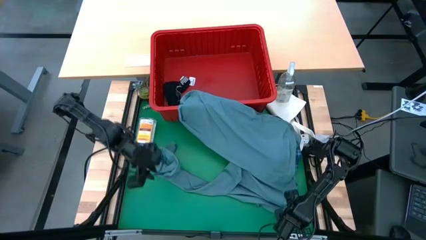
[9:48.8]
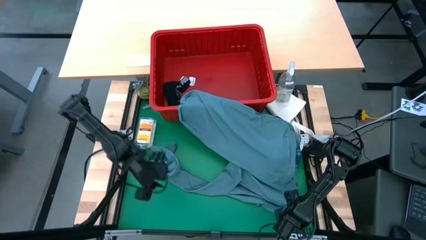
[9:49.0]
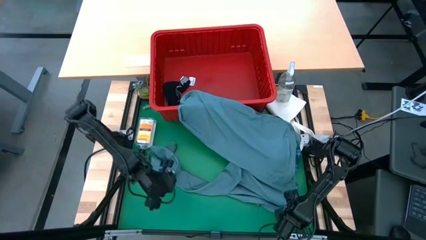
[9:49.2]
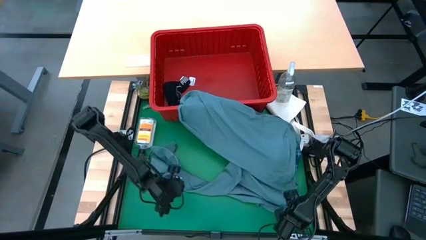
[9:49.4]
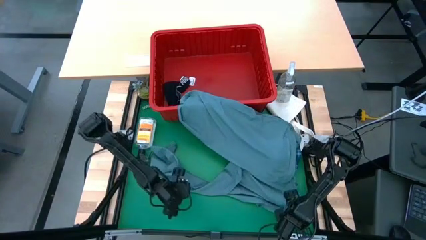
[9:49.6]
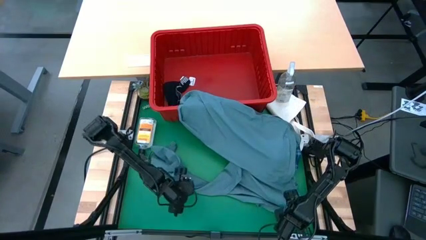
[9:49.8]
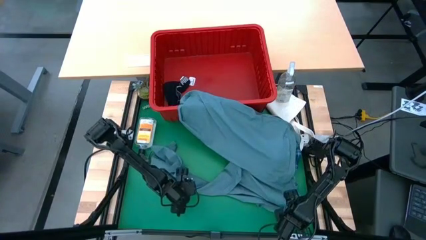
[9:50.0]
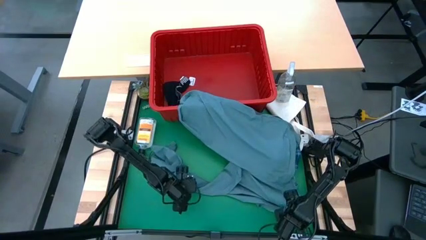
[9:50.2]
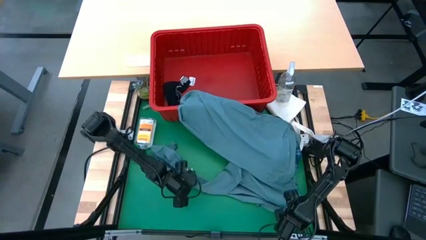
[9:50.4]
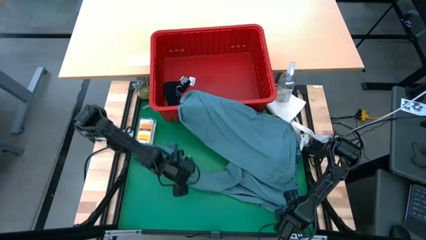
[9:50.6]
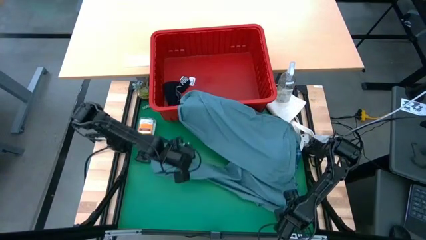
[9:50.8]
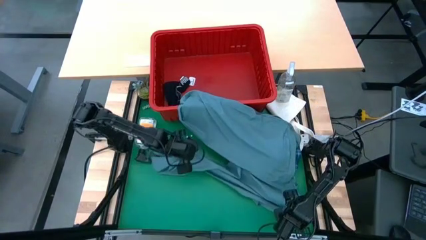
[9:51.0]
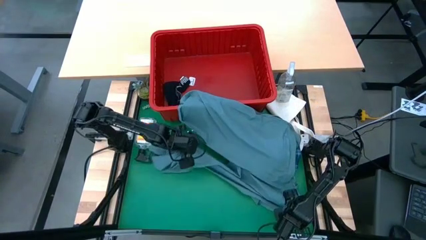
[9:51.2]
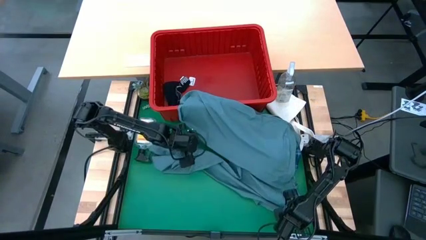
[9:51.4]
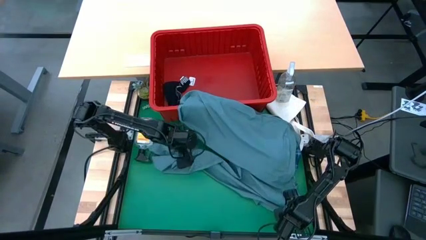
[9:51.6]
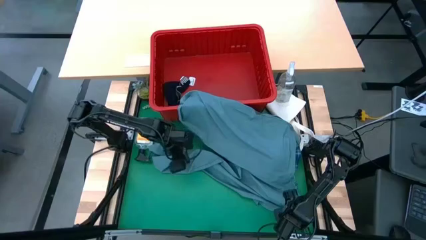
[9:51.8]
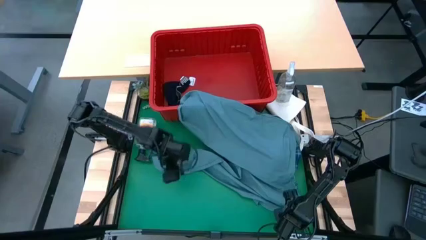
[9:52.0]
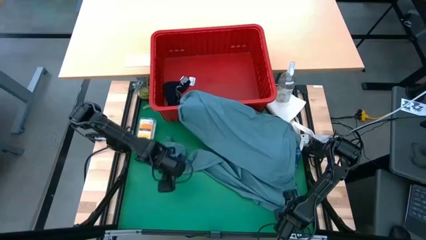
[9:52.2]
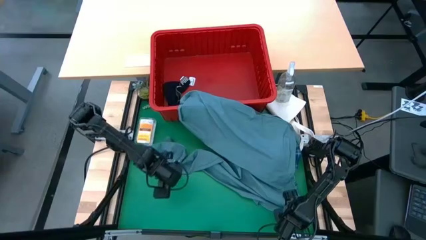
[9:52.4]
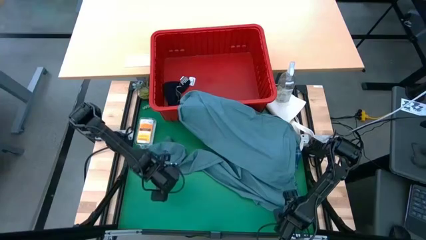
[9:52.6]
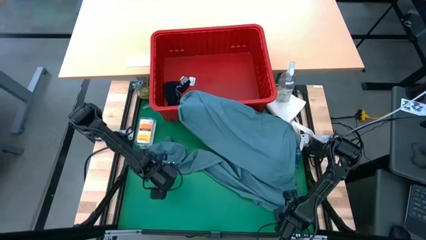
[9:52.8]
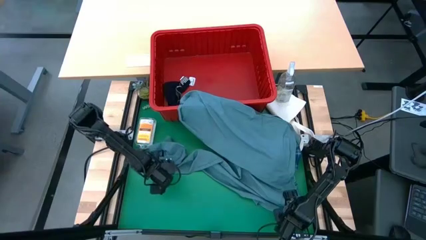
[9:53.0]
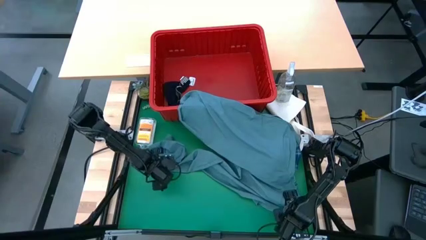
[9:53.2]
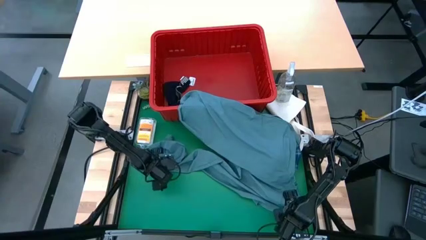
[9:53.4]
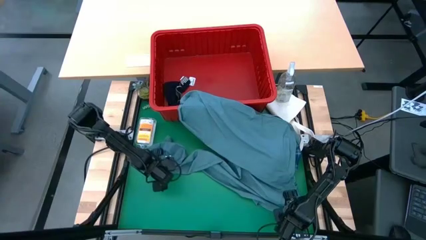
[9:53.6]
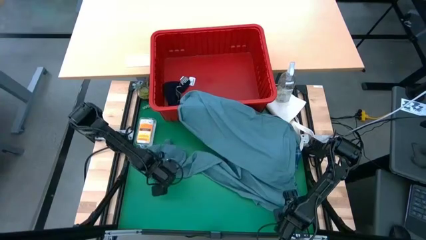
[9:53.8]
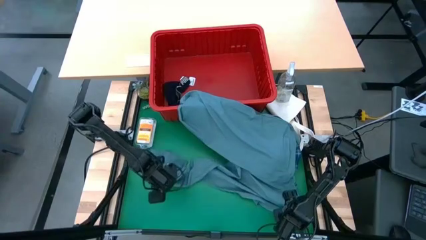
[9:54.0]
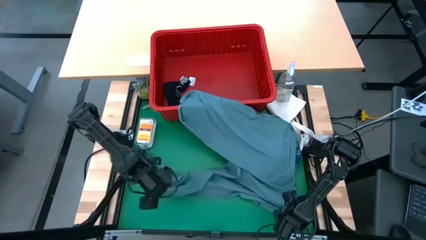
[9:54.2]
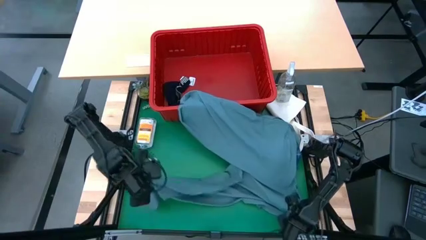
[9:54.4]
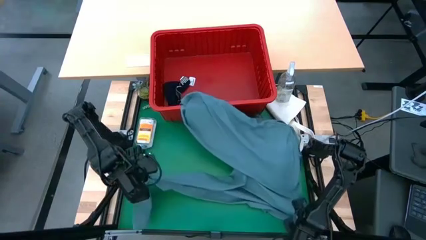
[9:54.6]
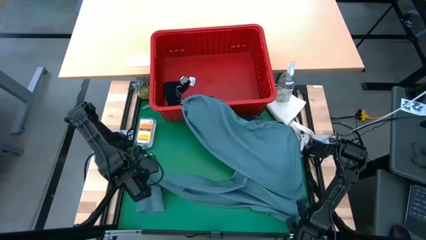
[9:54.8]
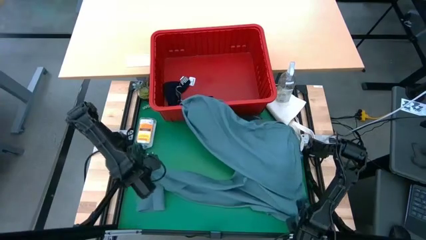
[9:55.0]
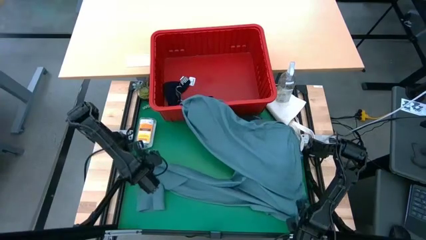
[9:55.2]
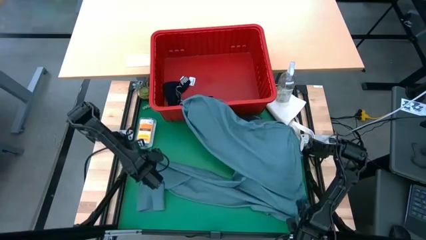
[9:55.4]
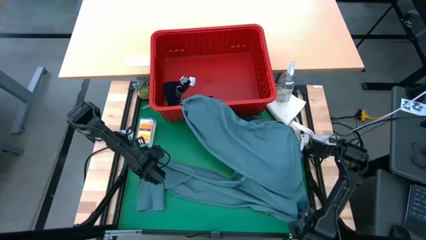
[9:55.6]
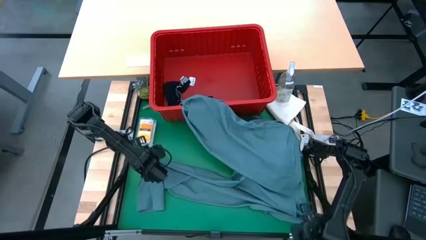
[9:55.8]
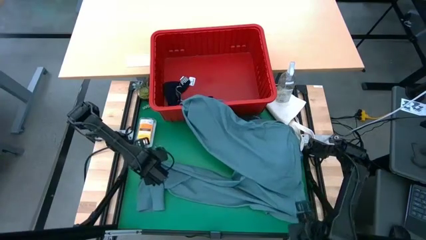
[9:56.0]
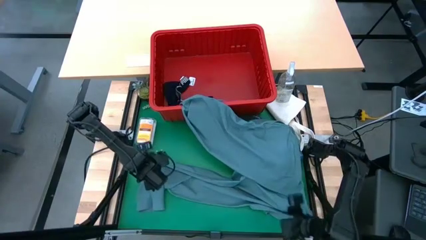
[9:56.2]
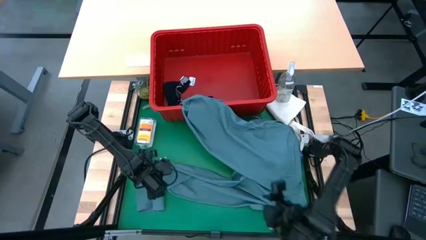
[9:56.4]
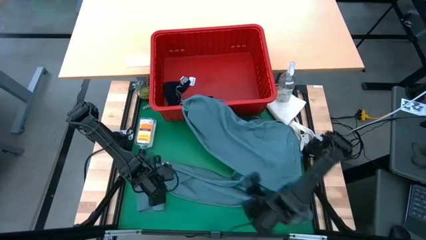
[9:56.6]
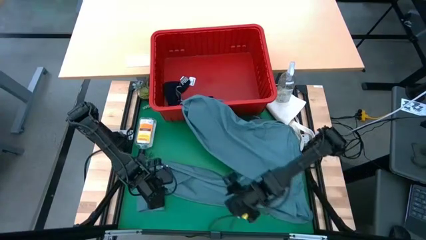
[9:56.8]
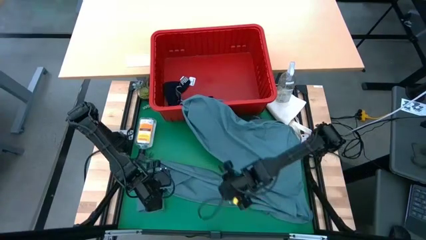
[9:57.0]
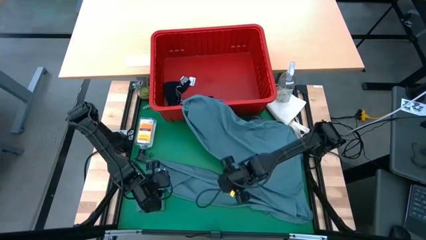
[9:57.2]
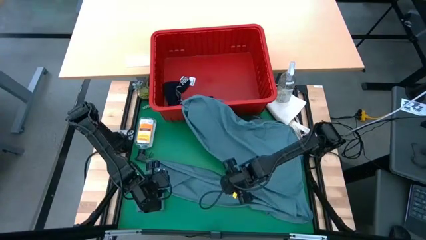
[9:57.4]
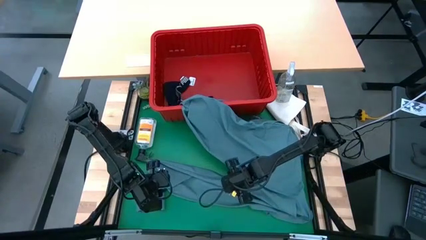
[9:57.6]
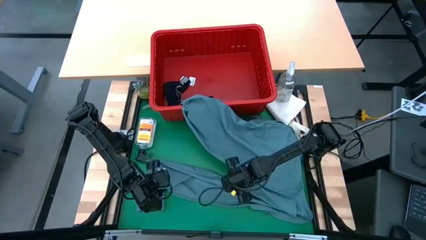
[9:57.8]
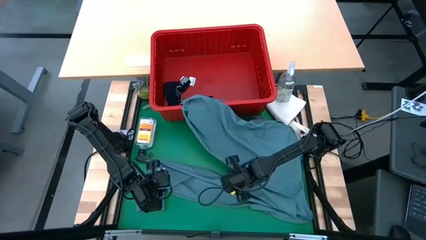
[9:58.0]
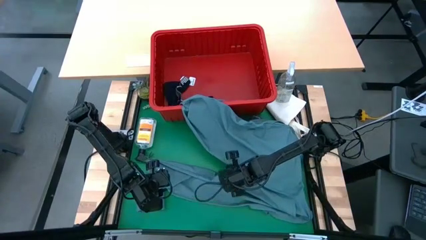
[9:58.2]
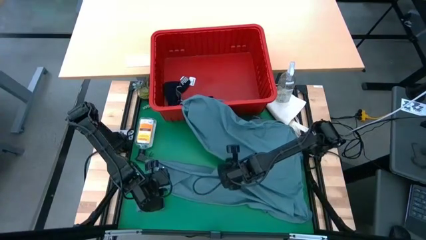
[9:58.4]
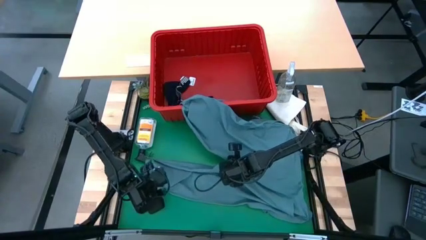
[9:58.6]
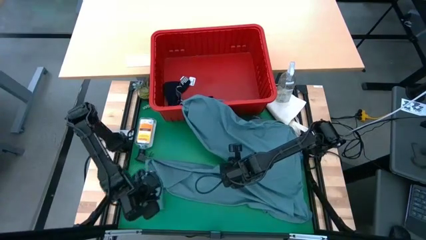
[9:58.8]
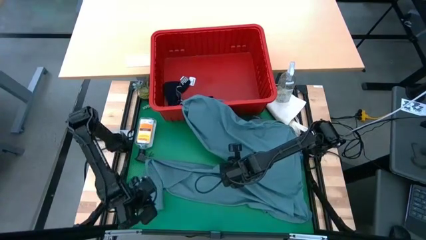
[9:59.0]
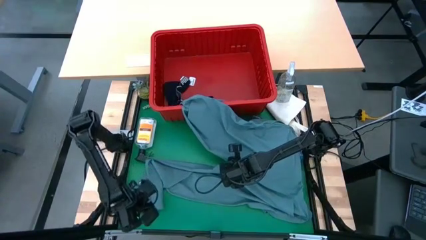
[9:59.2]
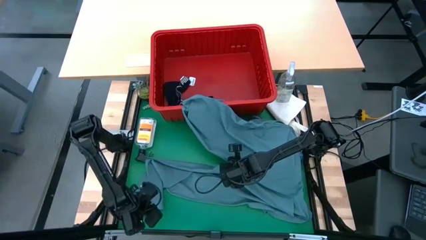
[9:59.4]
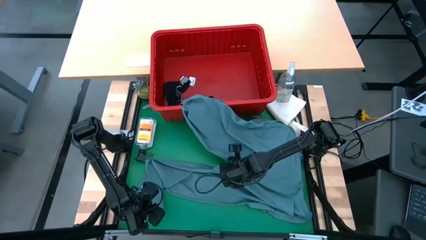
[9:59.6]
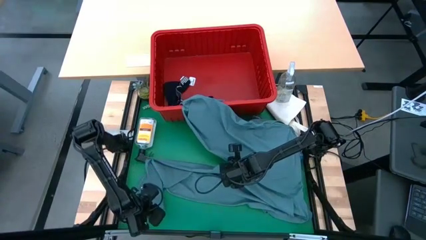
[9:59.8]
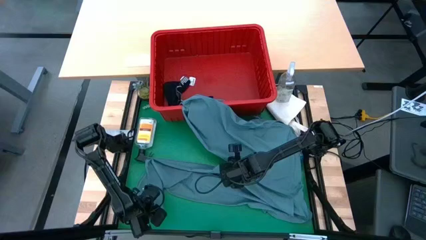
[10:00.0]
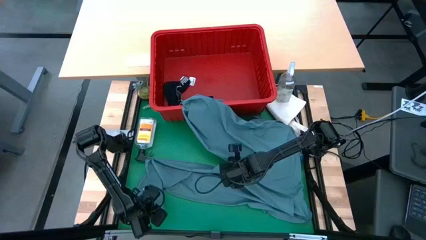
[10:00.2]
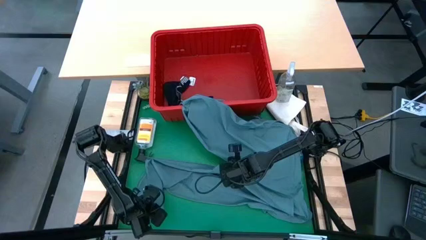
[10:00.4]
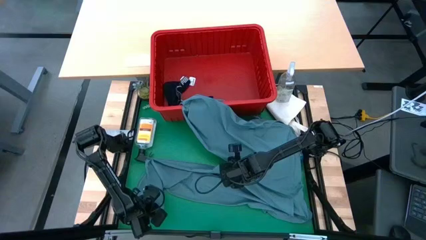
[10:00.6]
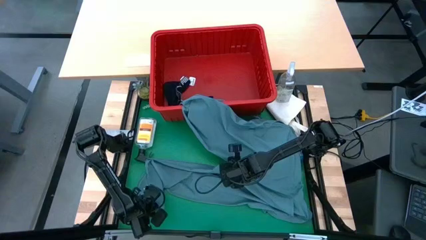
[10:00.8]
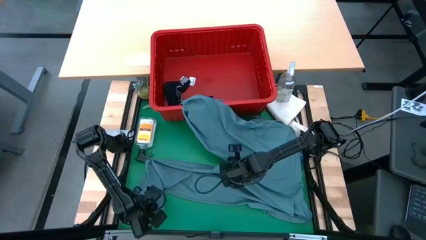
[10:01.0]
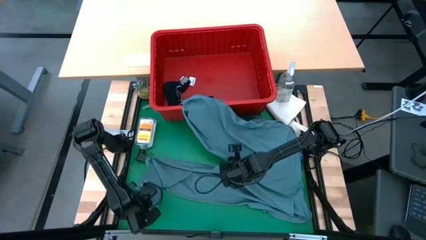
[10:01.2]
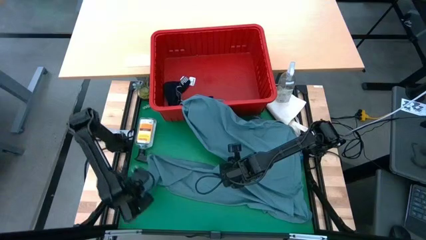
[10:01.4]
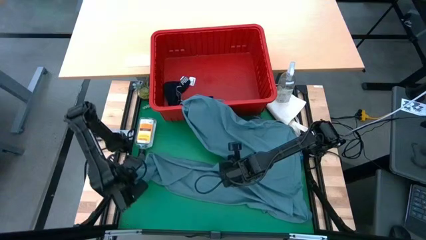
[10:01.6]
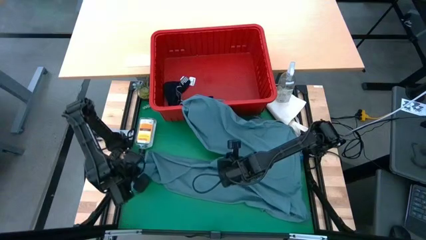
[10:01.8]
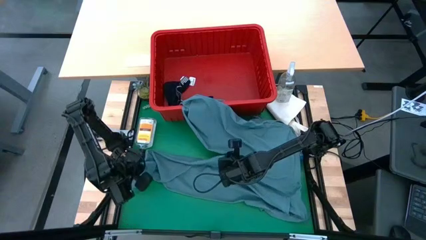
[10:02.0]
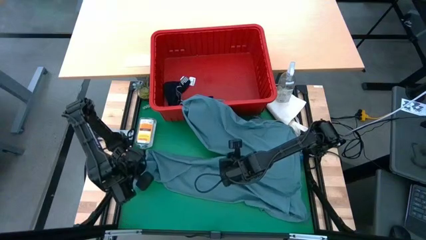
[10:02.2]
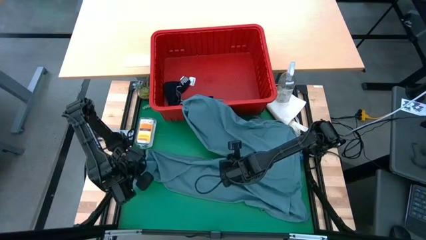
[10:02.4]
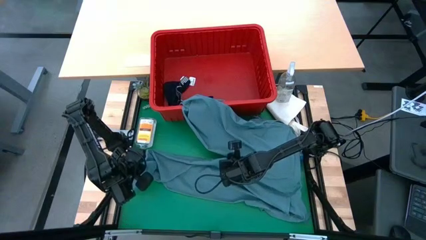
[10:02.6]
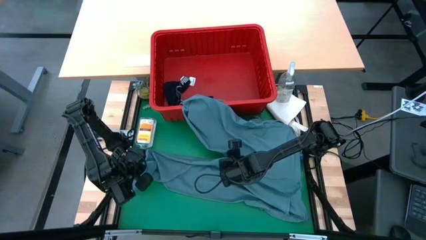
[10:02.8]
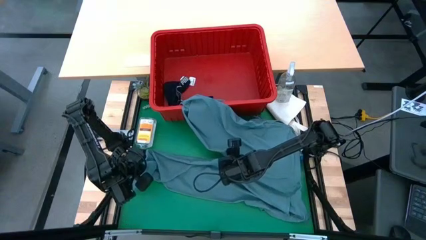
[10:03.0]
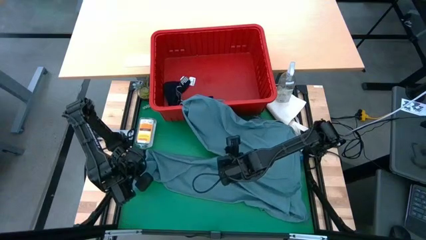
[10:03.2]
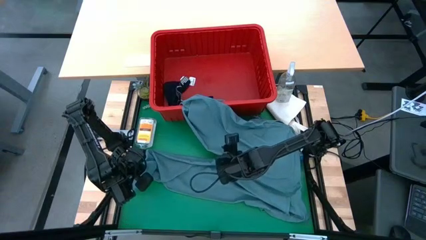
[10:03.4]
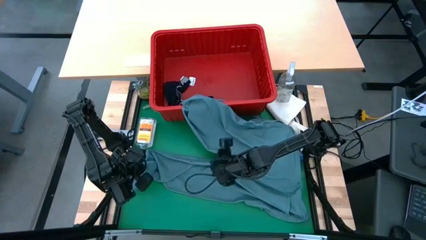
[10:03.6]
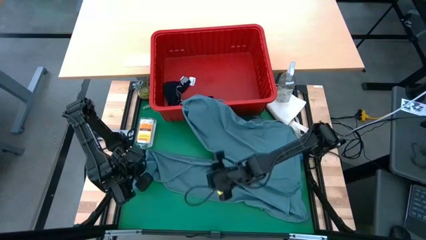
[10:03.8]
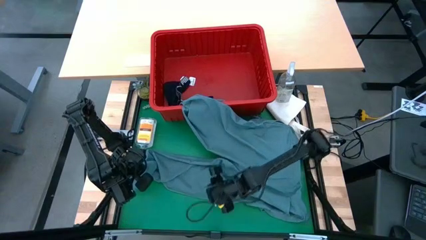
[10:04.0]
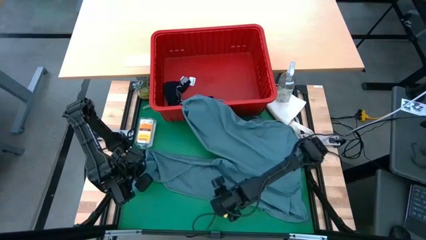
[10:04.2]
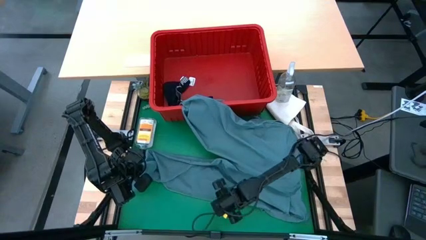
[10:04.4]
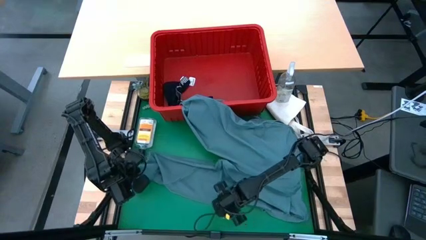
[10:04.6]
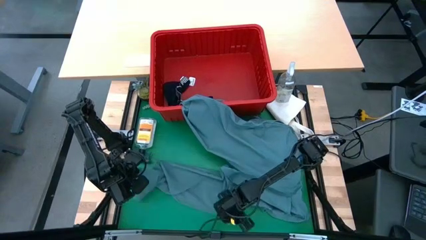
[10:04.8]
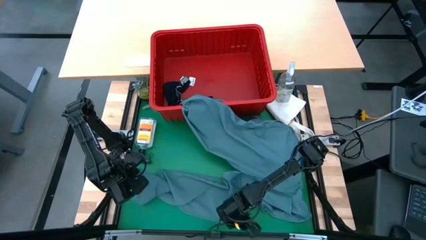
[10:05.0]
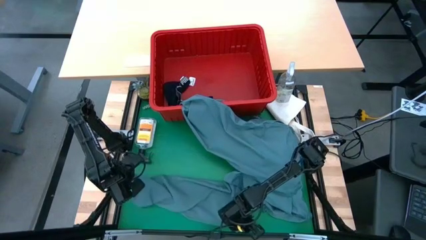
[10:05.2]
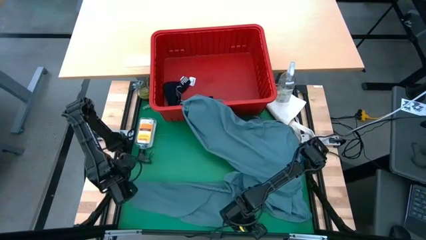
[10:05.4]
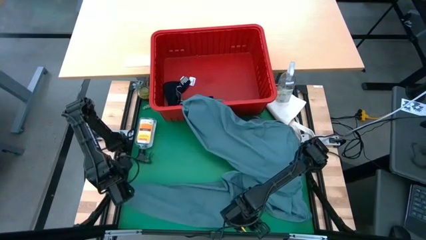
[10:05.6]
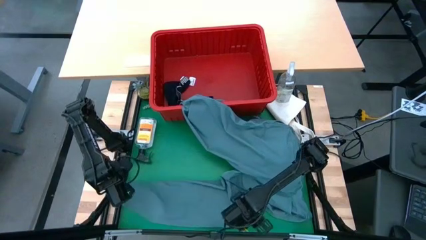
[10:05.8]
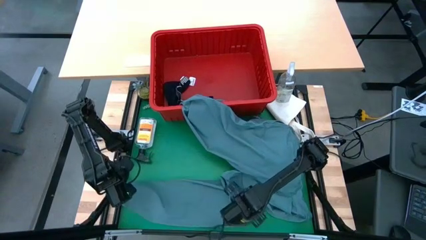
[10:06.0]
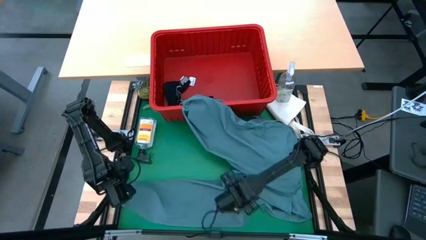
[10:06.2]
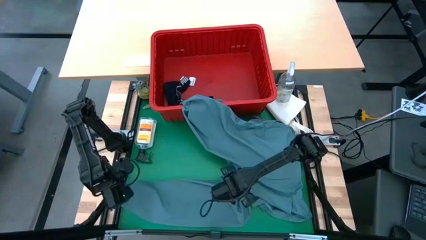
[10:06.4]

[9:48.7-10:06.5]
Task: Fold Laundry from Bin
Fold the blue pants on top of the blue shirt
